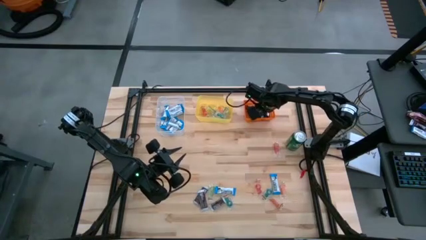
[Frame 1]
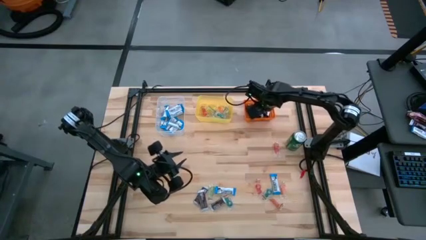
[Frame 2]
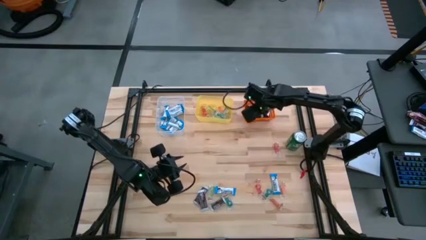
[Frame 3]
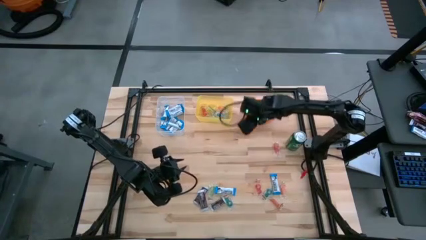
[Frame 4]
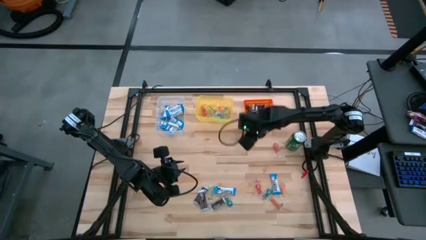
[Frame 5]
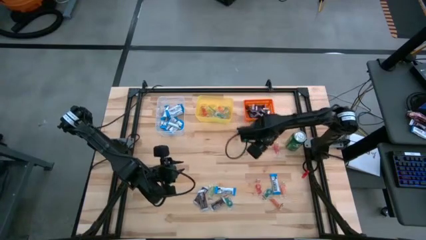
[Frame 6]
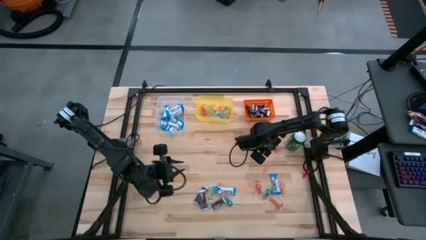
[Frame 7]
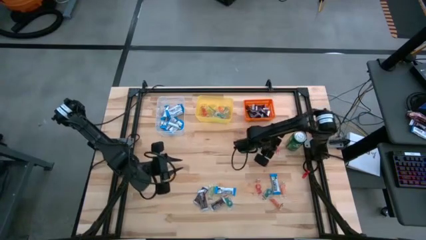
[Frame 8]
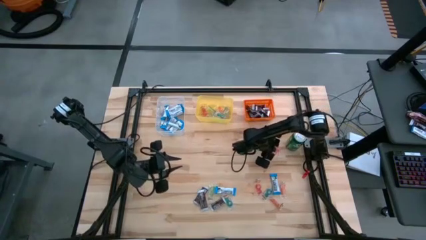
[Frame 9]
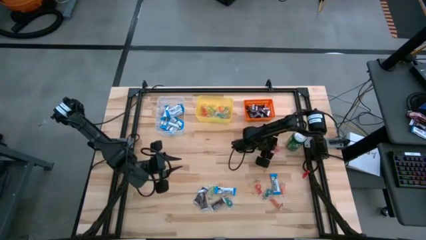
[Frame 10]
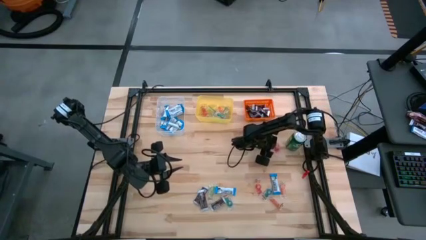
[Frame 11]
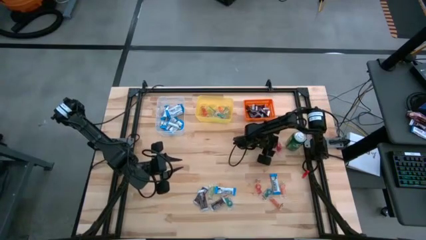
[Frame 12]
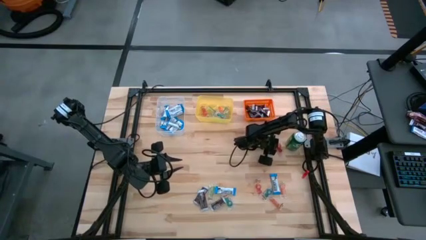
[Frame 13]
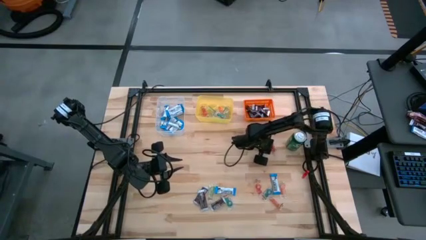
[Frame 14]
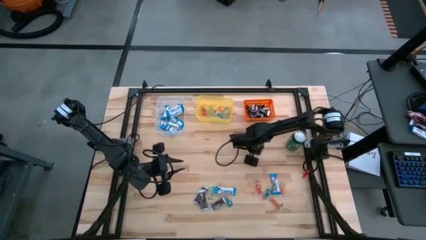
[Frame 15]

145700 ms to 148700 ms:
Task: Sort candy
Put the red gummy into the yellow bin

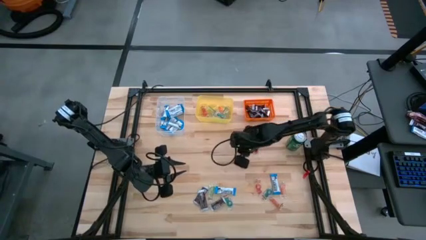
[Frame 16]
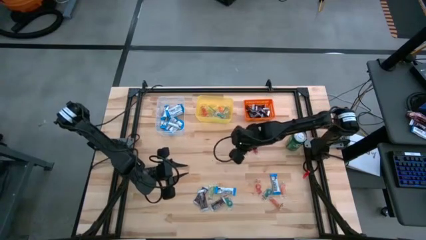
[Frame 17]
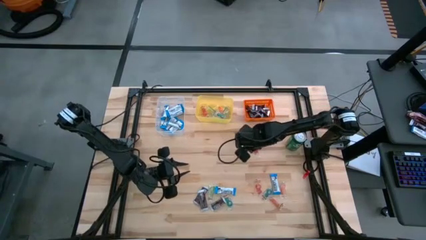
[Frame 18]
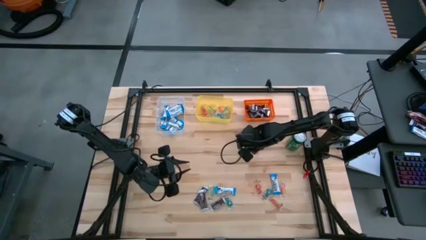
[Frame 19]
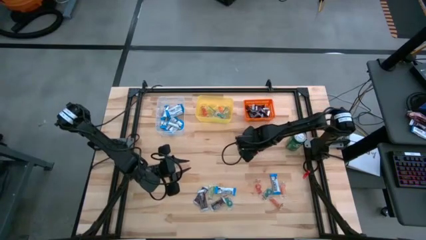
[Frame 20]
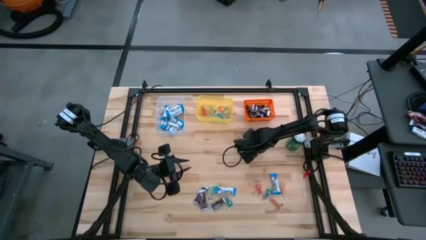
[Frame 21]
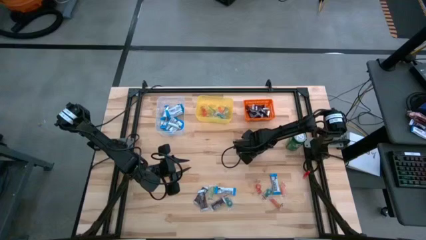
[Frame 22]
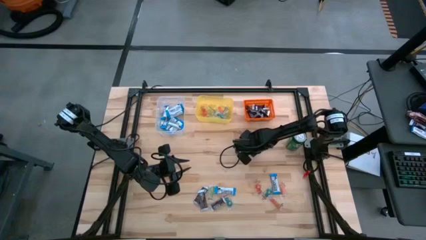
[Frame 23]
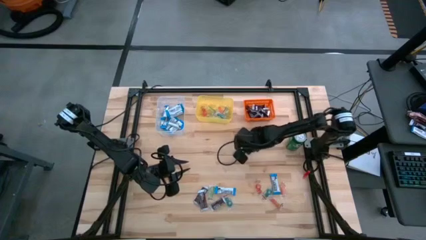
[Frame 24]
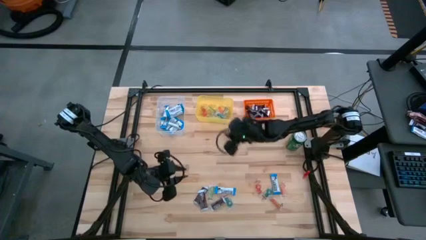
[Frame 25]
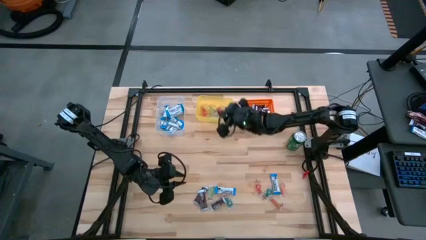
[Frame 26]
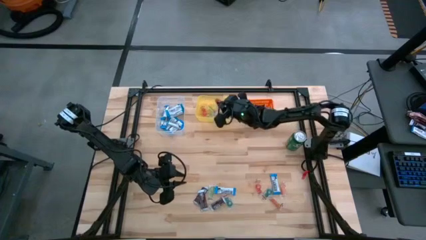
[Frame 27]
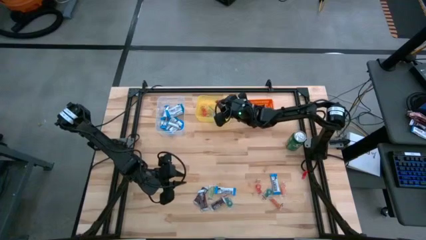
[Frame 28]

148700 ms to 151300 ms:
Put the red gummy into the yellow bin

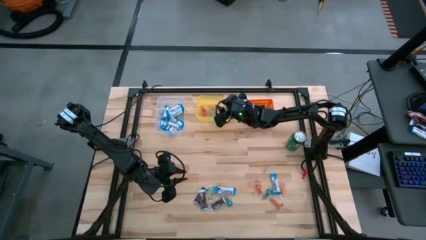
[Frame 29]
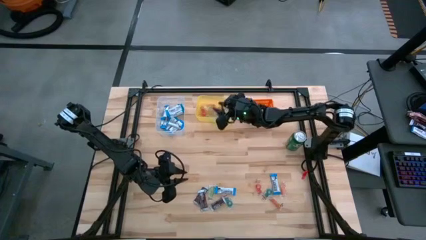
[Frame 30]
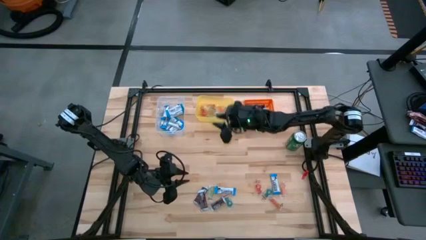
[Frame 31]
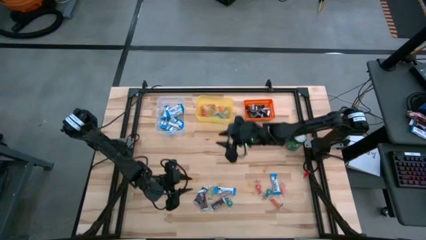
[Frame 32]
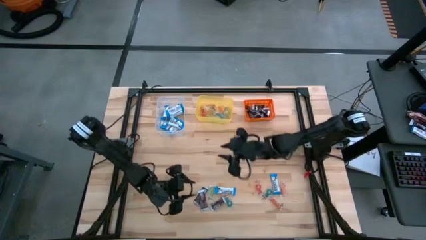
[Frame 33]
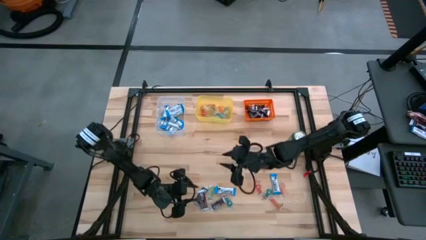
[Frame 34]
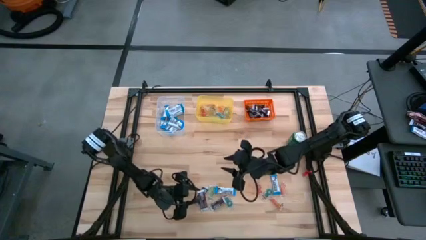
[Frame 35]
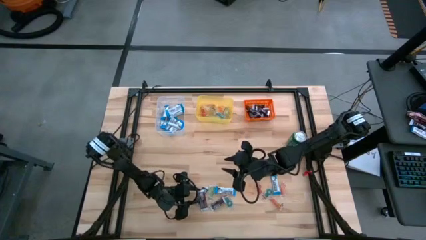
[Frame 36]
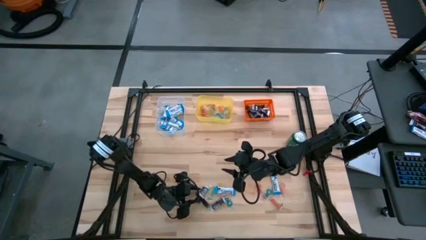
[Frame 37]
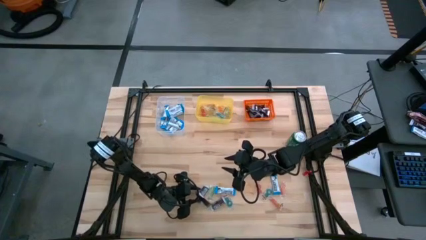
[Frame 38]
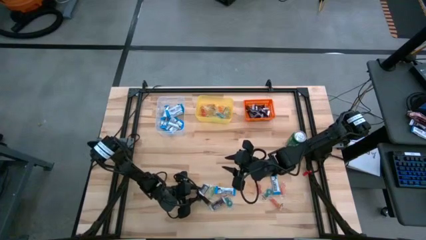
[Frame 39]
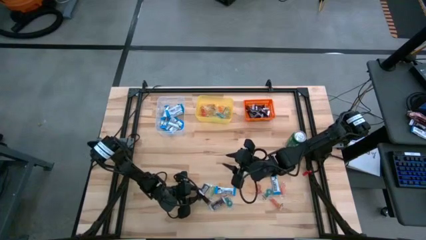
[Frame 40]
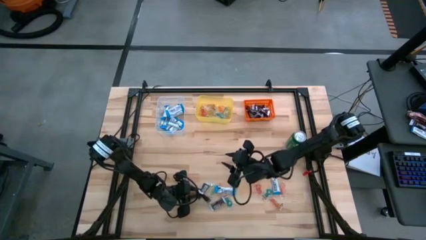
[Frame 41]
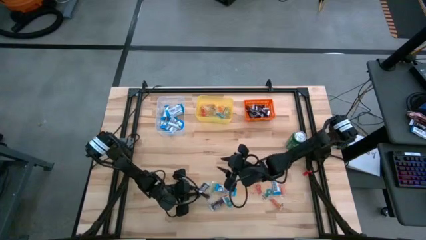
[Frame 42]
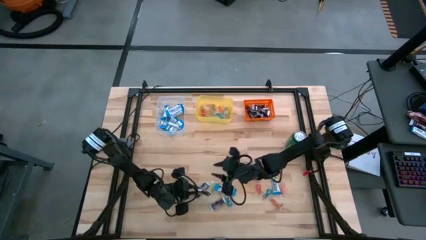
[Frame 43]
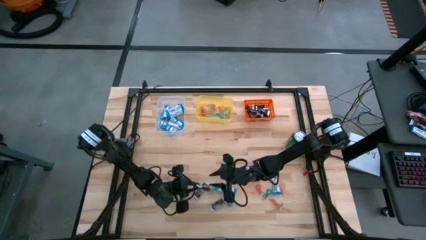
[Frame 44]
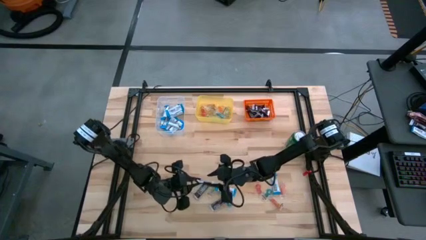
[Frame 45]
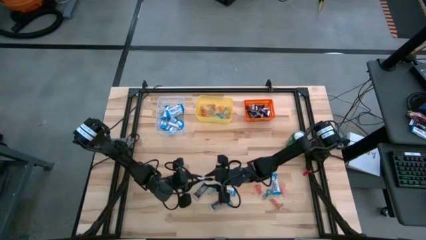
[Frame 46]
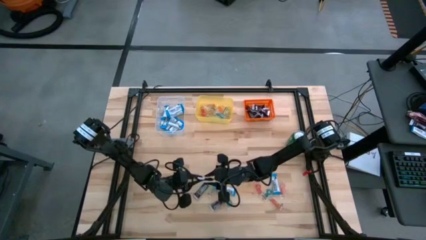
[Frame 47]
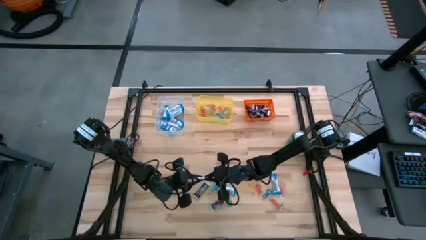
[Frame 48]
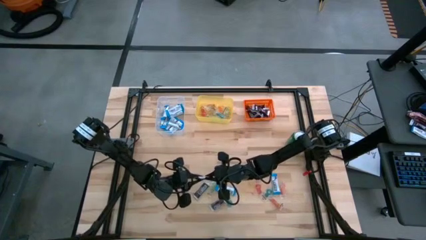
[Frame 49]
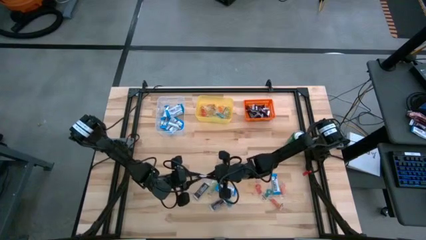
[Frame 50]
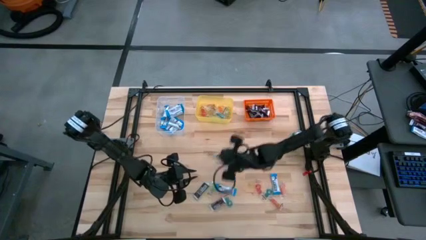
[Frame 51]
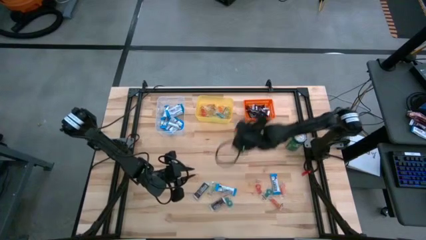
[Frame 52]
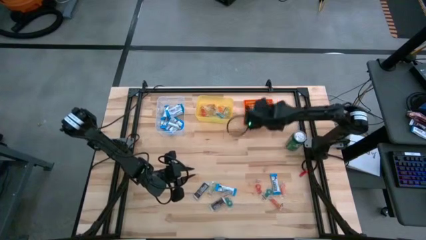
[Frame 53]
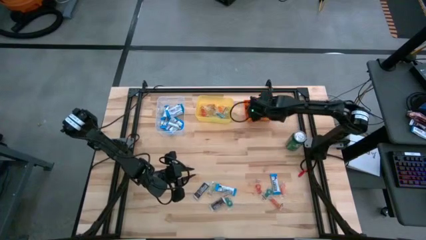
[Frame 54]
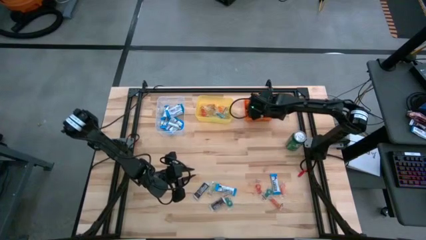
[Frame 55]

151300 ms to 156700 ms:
Put the center black chocolate into the orange bin

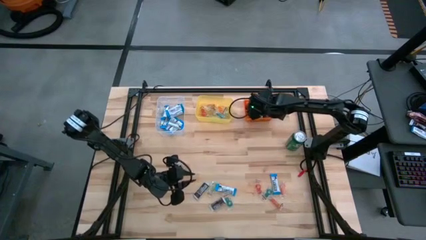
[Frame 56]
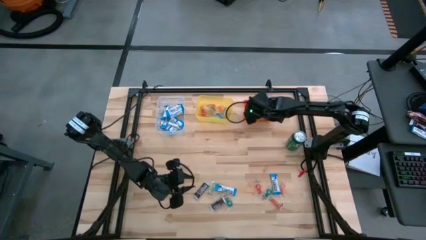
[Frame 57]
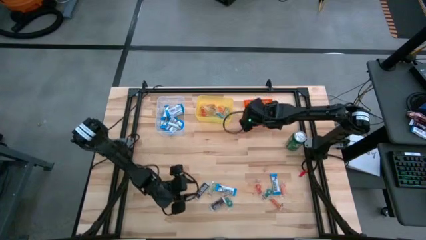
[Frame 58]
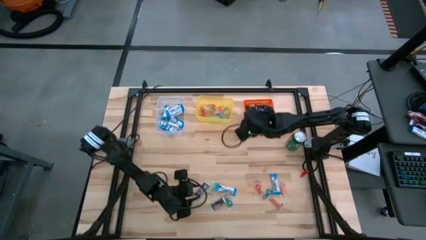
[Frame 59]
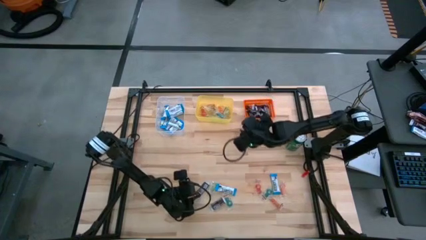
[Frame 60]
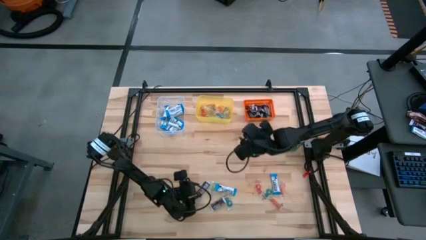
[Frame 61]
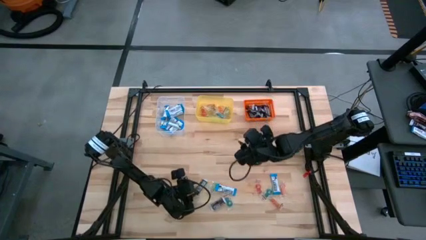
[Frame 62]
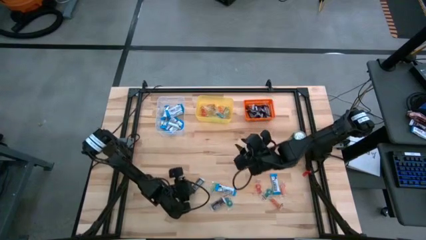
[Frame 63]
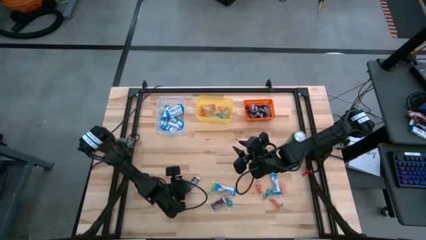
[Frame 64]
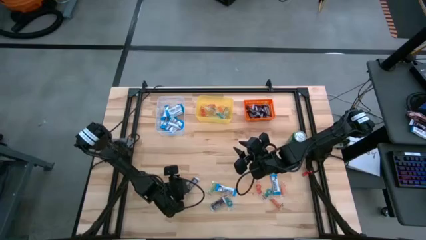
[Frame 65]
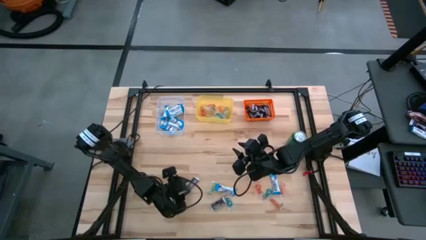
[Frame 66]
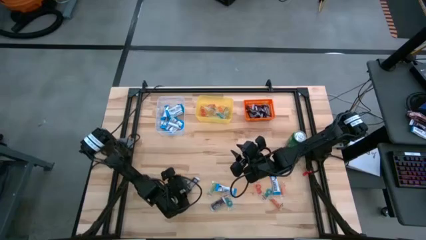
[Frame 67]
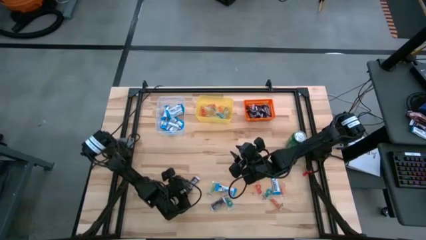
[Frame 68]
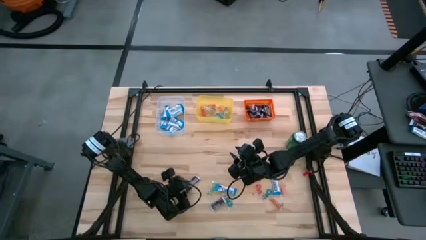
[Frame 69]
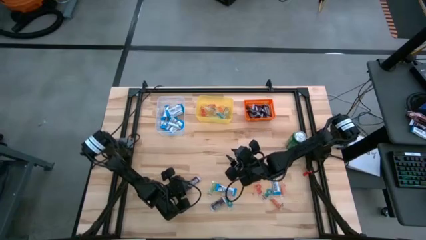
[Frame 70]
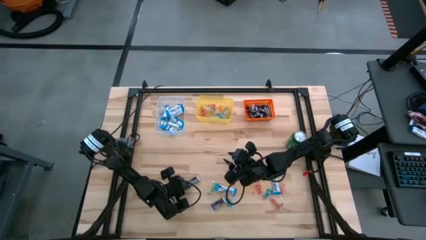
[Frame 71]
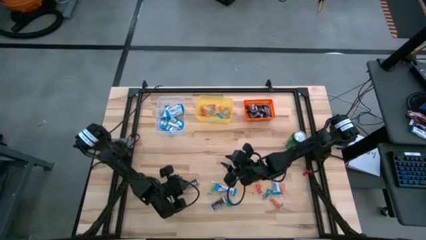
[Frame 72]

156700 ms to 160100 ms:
Put the left black chocolate into the orange bin

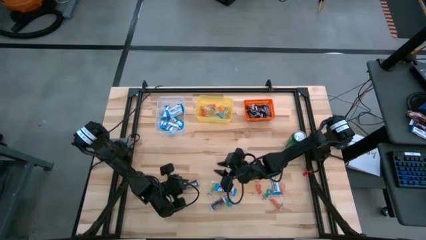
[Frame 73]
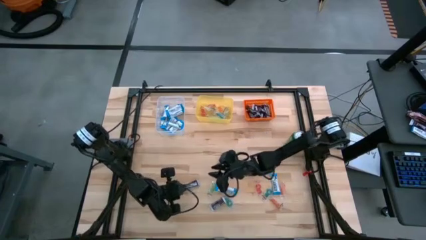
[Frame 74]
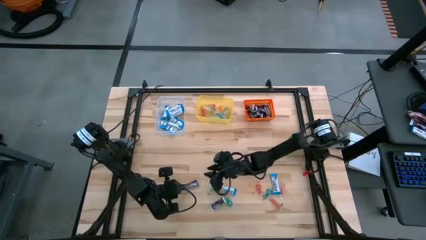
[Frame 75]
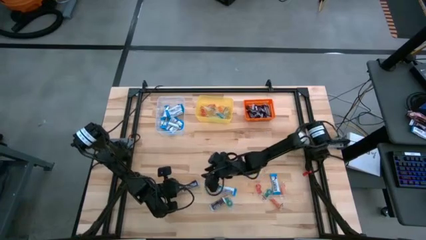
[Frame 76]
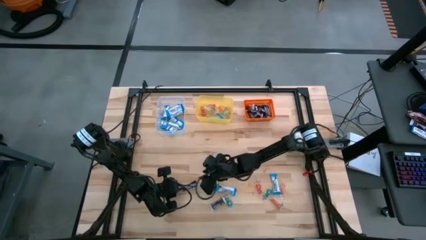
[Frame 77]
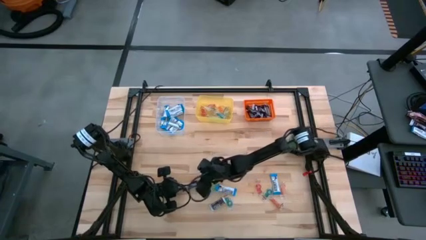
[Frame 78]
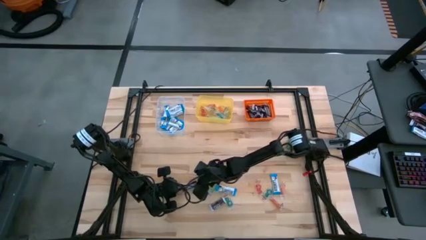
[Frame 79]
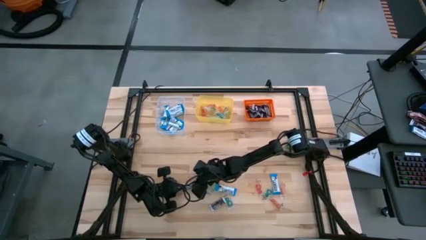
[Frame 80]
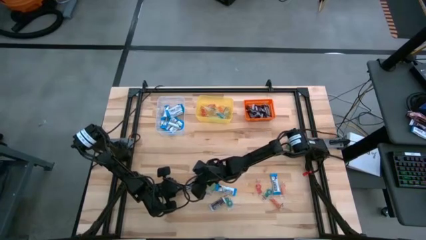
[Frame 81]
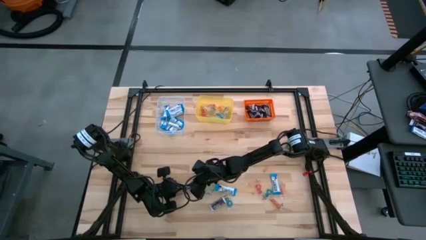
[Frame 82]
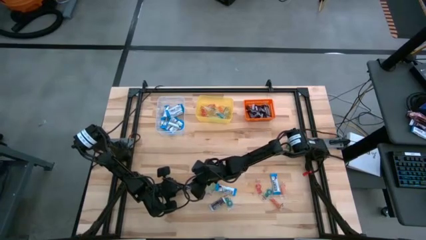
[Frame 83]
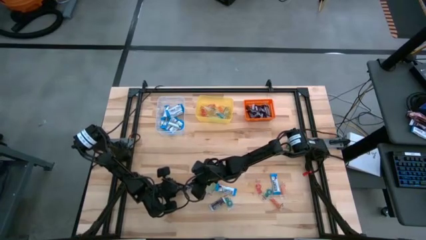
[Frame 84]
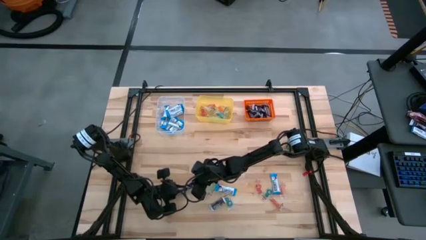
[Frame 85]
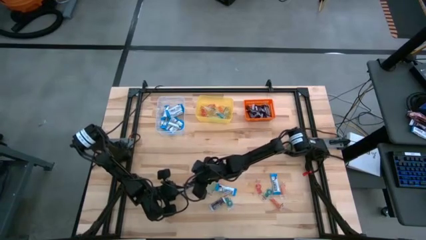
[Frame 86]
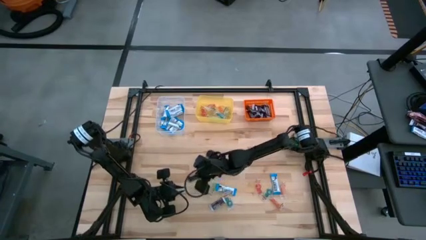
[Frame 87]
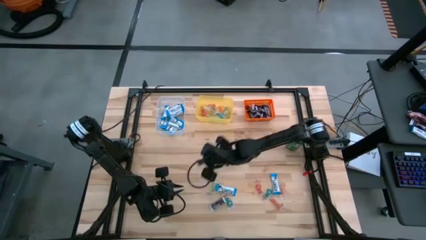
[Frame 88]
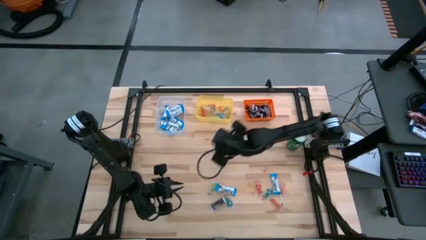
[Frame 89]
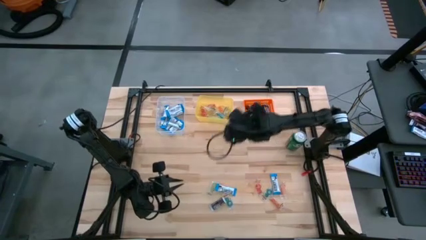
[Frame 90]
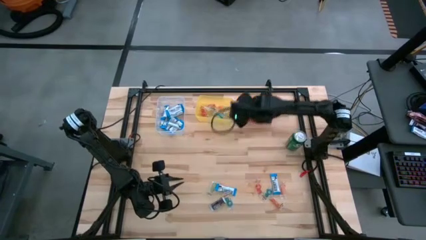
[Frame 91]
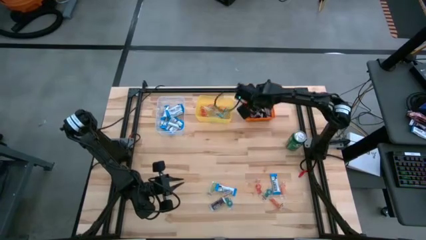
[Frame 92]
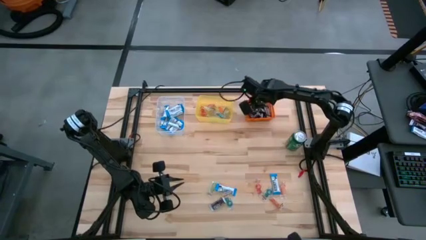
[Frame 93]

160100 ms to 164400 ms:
Put the black chocolate into the orange bin
